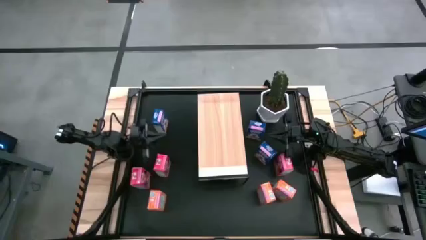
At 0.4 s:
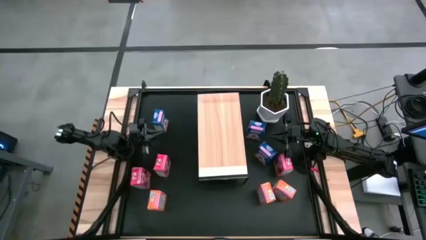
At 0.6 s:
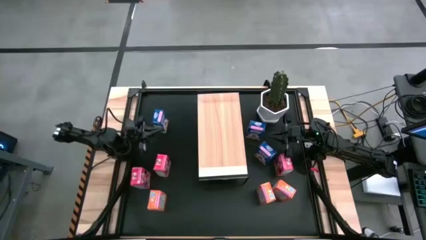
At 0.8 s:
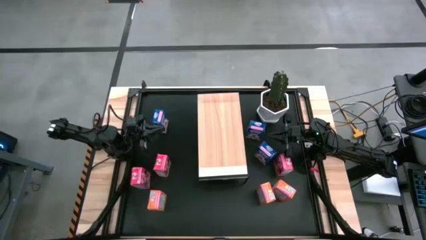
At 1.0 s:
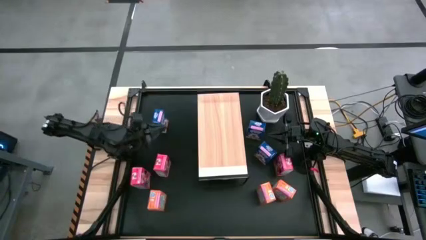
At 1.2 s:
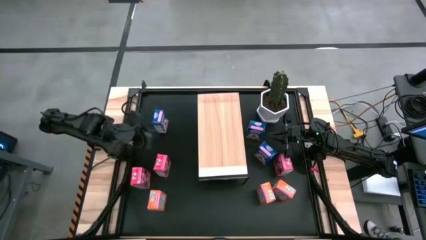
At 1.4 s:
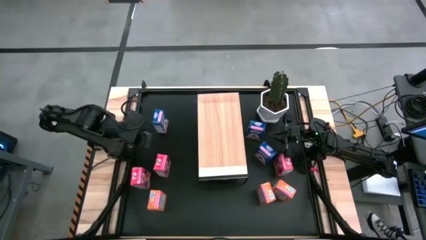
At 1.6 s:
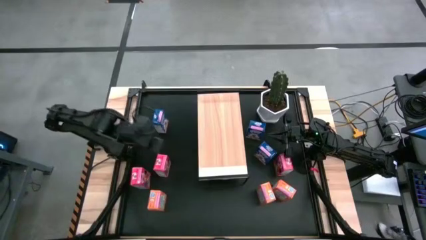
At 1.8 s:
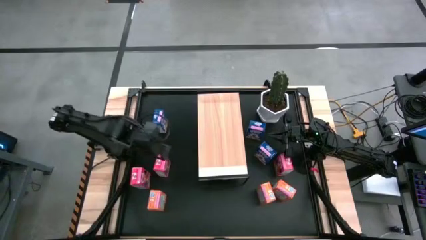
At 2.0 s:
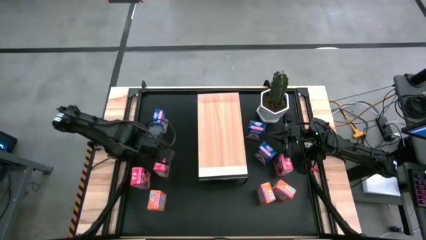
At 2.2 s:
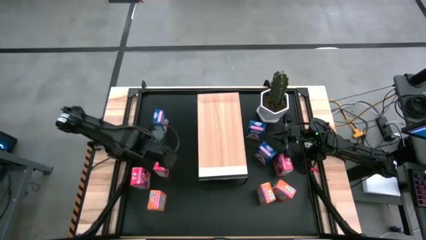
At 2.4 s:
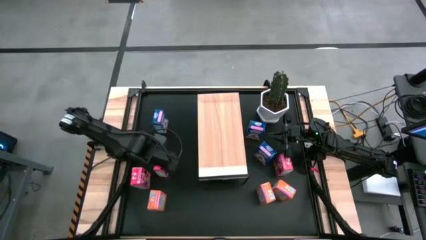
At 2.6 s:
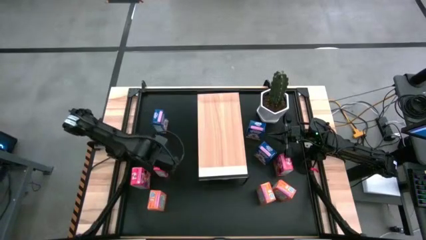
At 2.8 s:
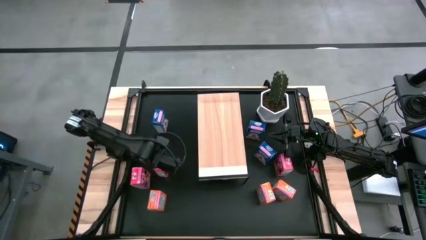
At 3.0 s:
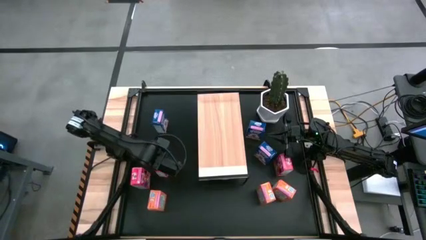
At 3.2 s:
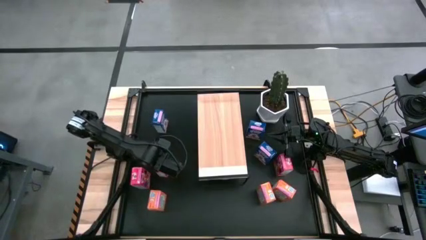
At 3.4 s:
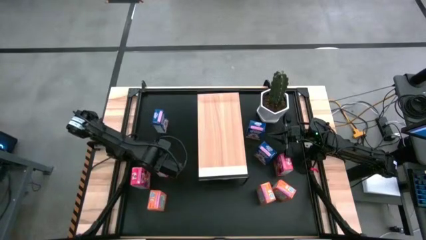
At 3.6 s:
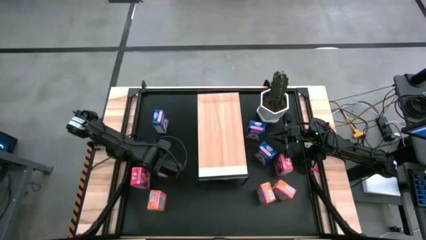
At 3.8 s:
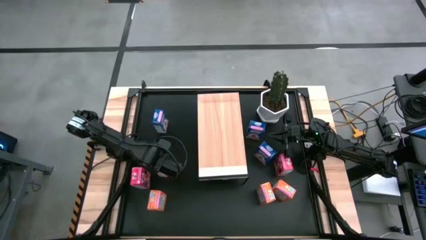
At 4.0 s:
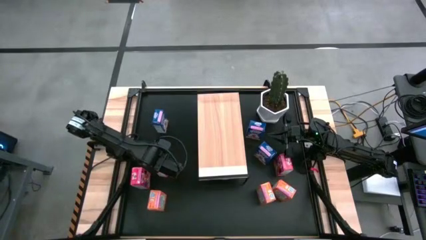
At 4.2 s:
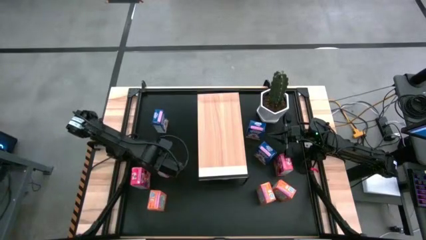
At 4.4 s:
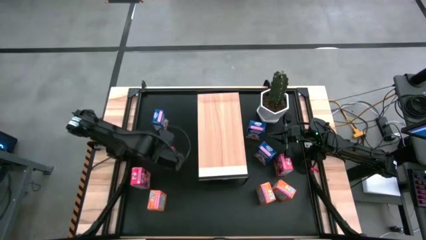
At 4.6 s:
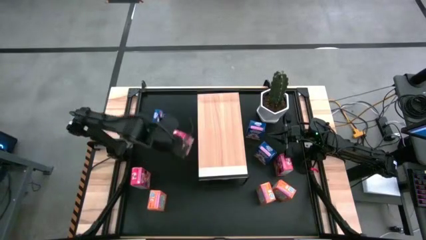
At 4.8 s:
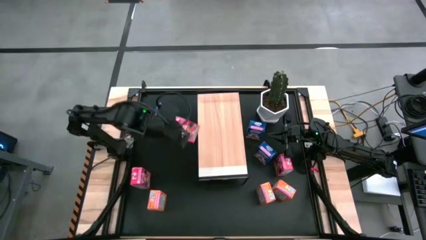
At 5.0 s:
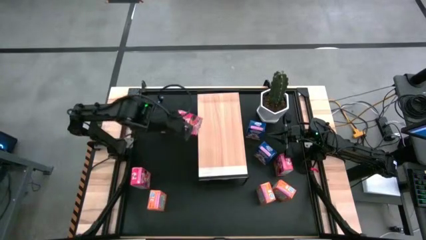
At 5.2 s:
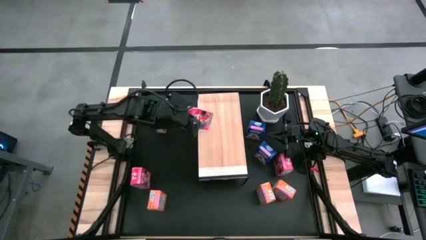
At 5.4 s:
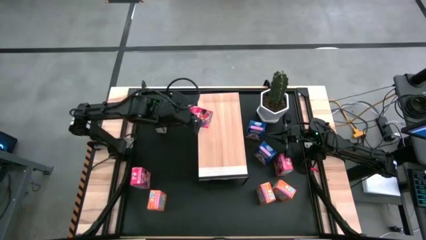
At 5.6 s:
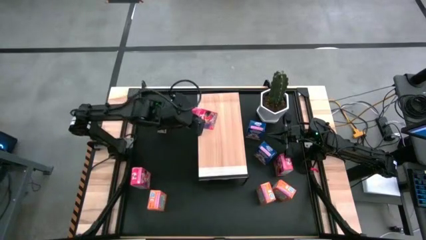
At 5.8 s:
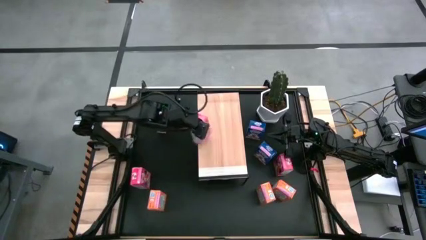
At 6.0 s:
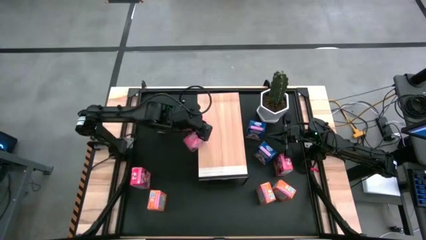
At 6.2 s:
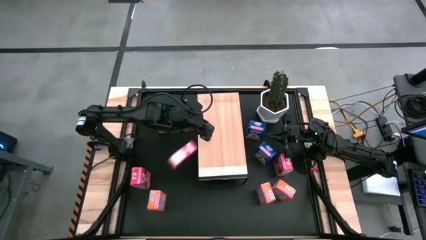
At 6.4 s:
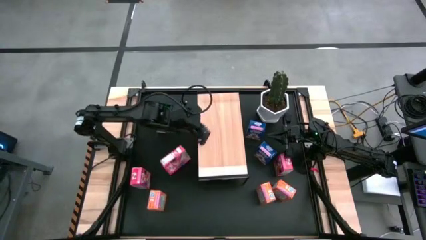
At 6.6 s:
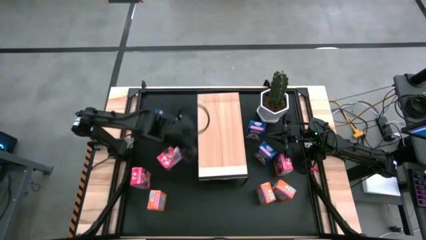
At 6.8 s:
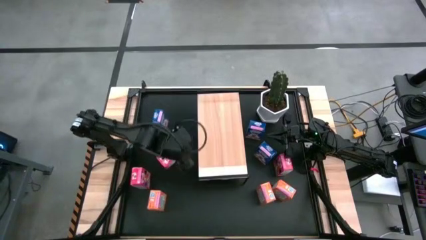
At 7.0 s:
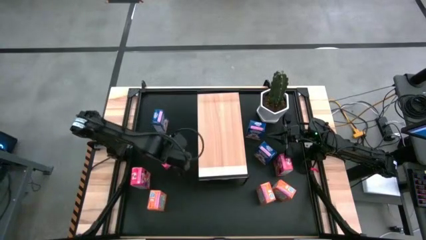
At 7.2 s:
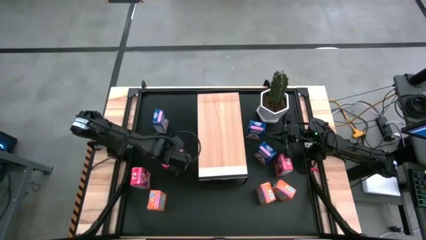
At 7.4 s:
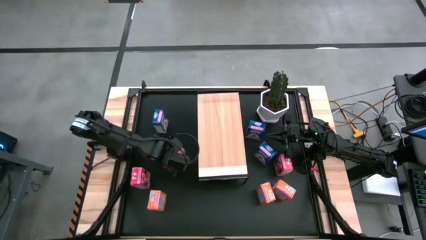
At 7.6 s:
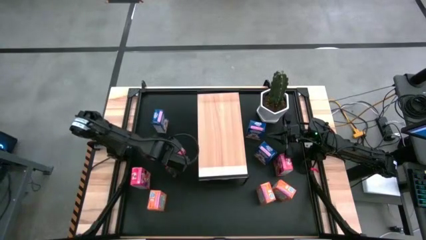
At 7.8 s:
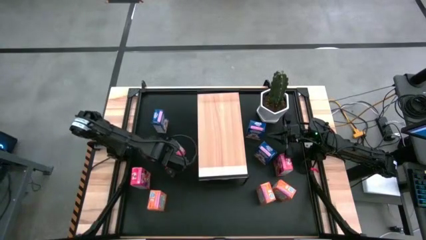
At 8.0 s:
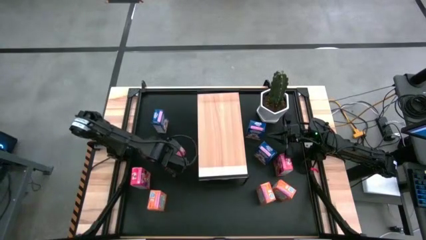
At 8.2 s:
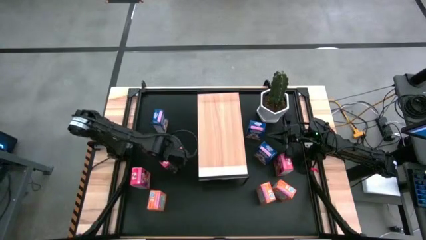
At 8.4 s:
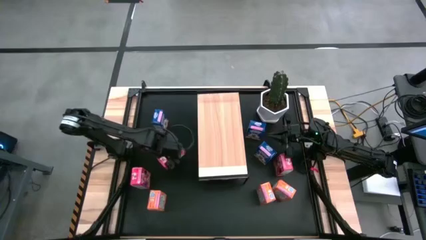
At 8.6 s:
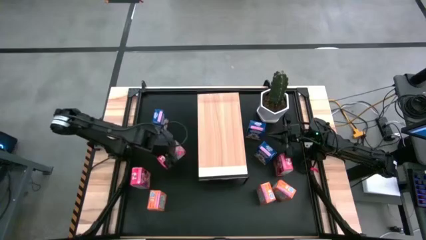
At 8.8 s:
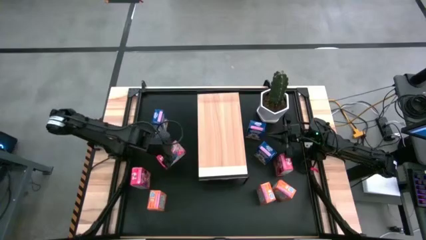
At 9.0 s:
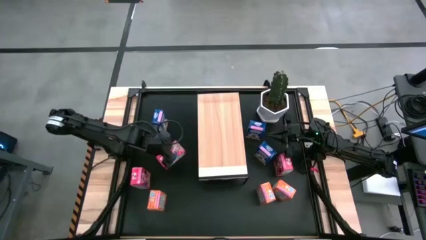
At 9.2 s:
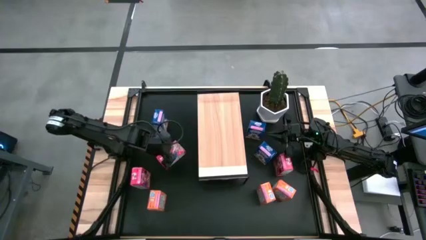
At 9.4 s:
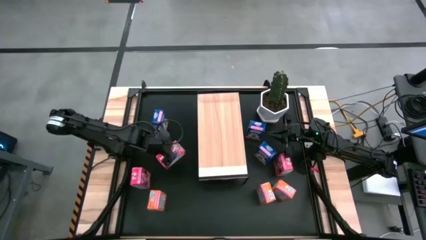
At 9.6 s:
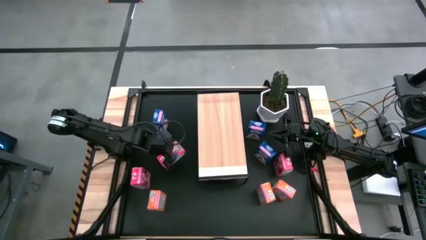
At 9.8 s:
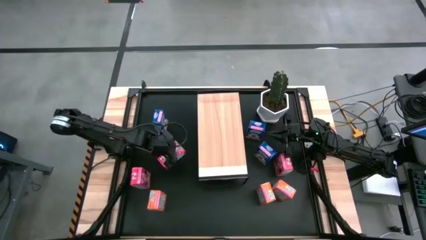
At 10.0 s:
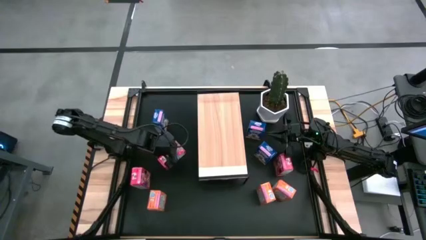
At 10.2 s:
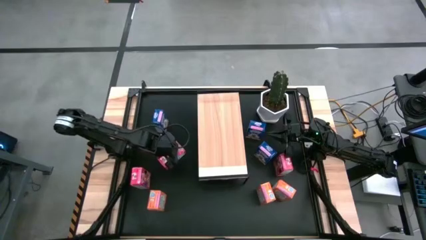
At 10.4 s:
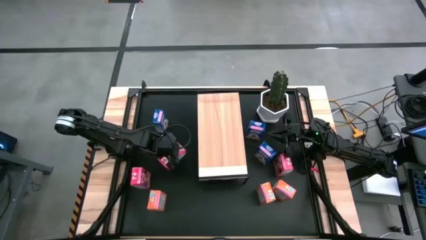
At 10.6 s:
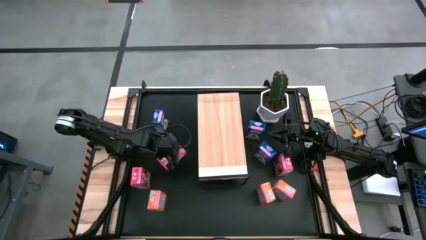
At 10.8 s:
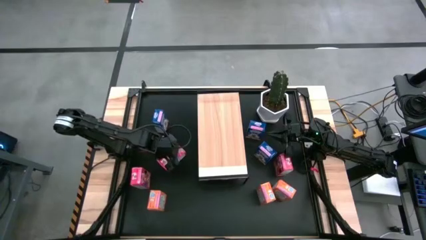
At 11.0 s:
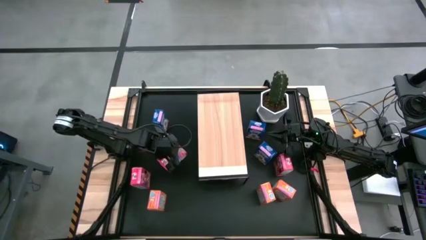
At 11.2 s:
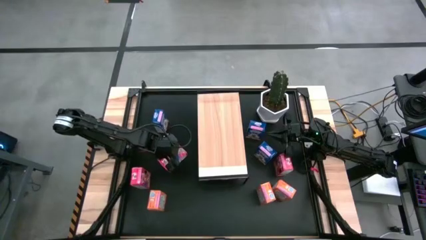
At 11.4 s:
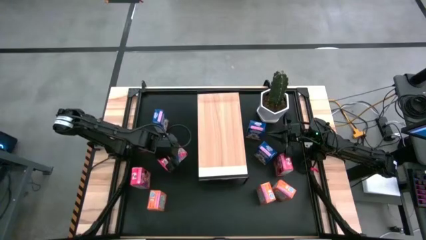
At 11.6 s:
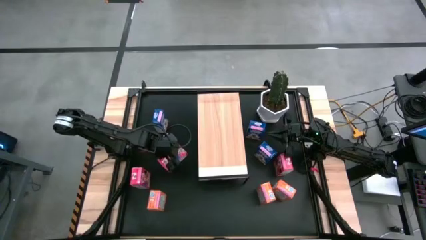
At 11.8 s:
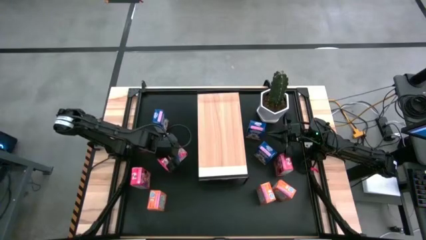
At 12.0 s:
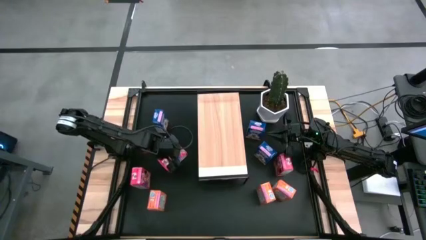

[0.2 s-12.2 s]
Task: Stack cereal on shelf
Put the top left red cereal box on the shelf
